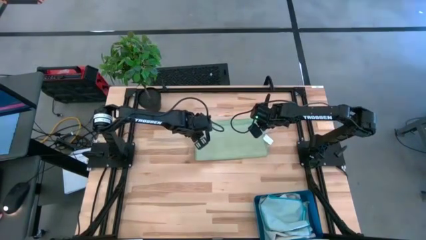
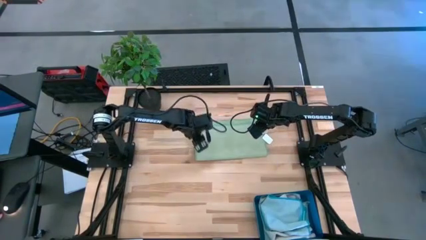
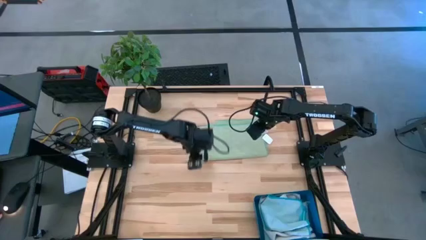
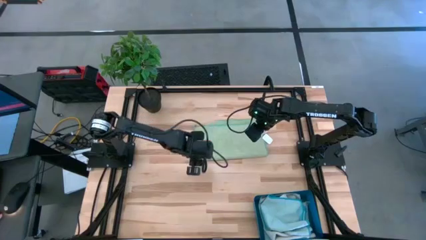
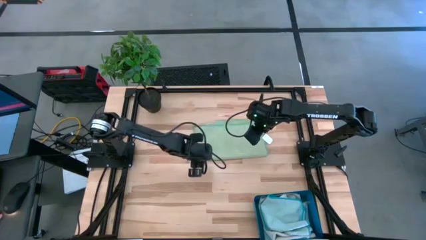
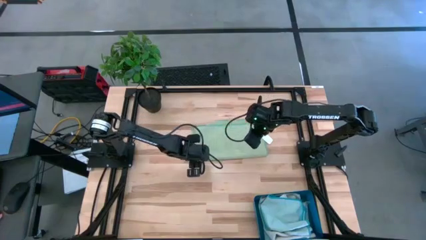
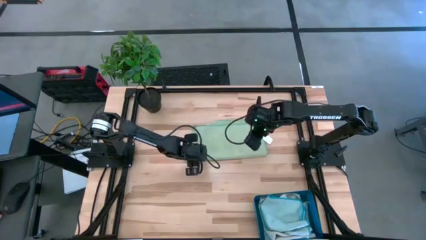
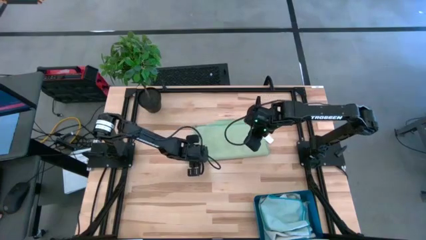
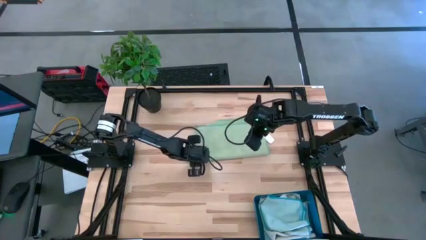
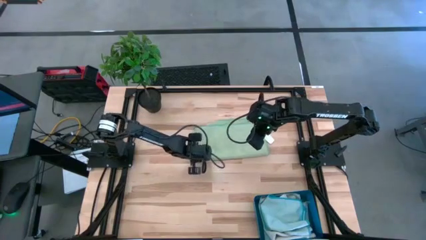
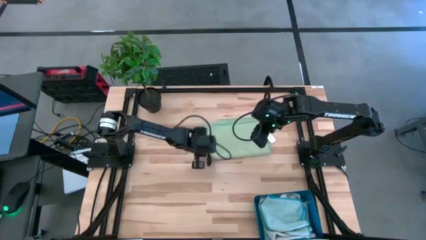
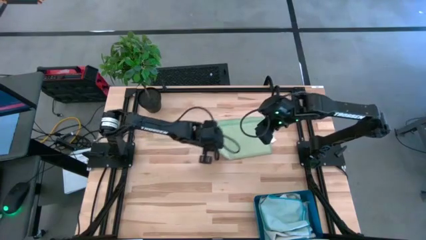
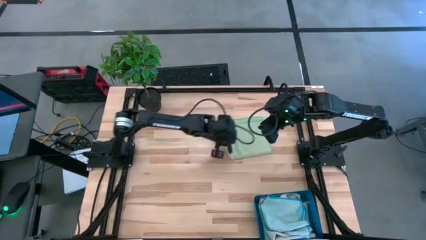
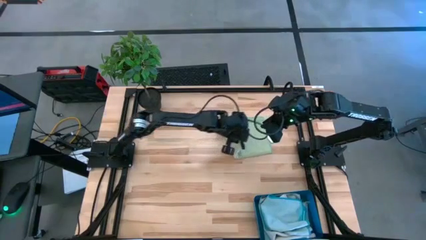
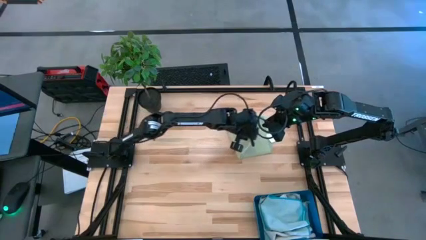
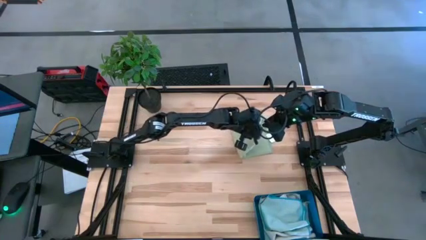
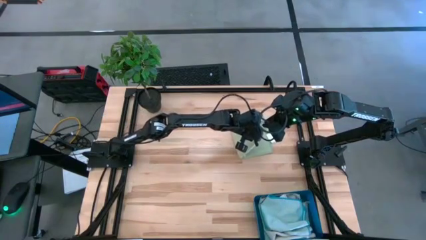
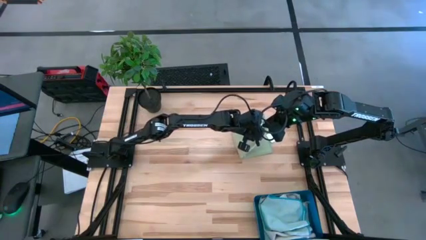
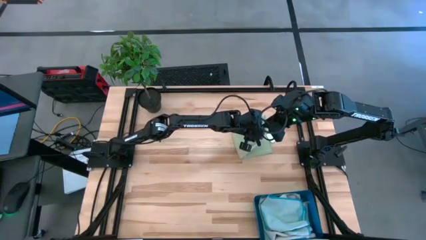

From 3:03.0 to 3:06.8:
Task: Fold microfiber towels
Fold the green microfiber cloth

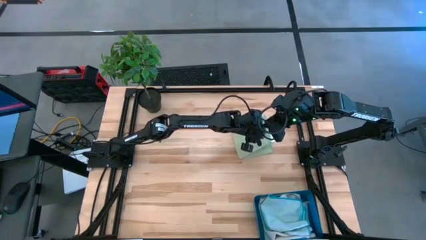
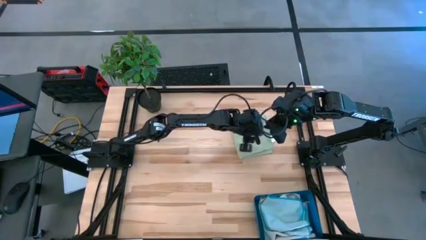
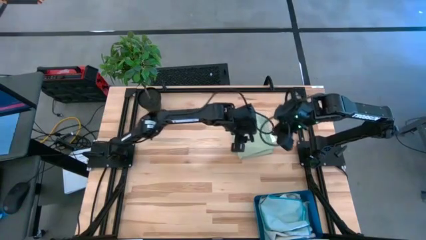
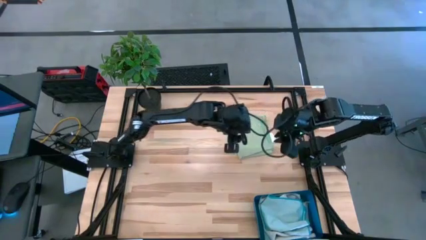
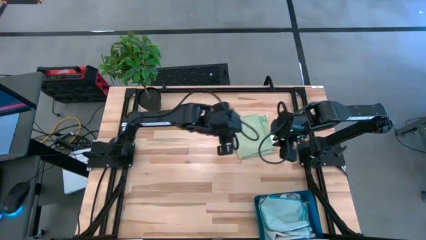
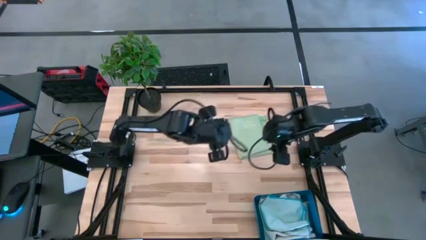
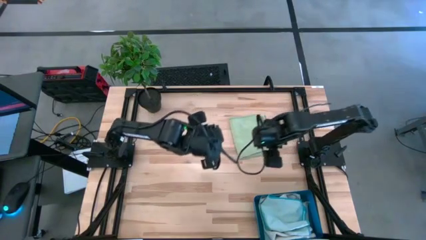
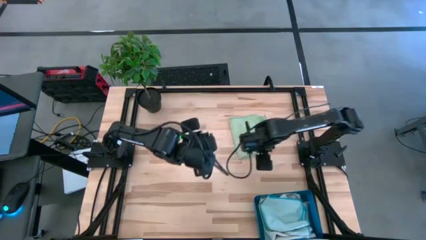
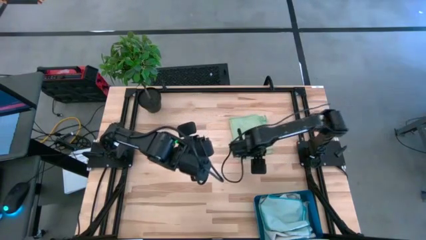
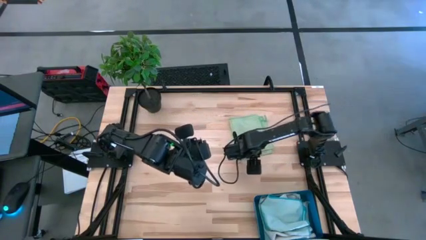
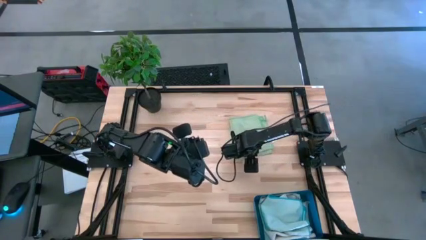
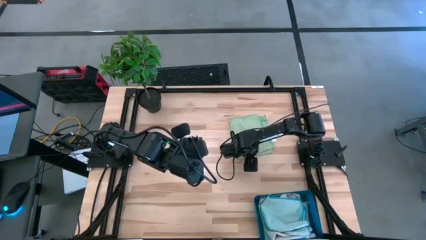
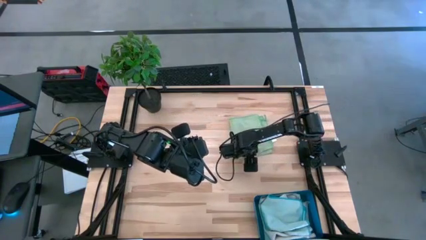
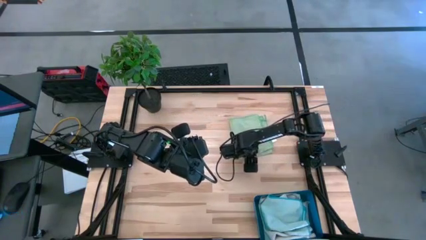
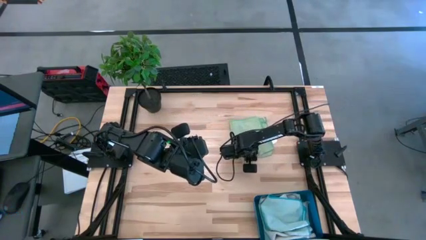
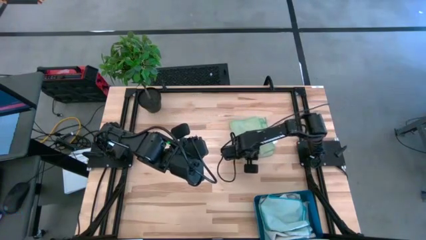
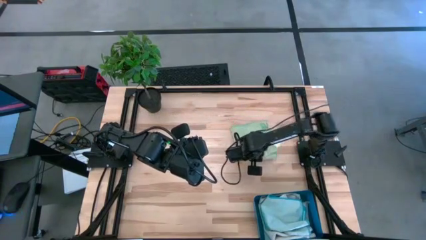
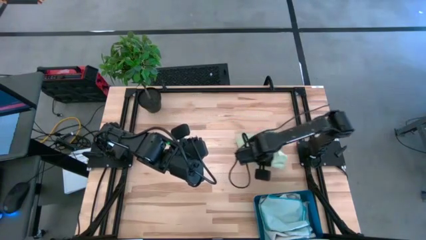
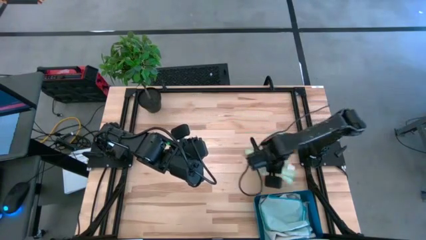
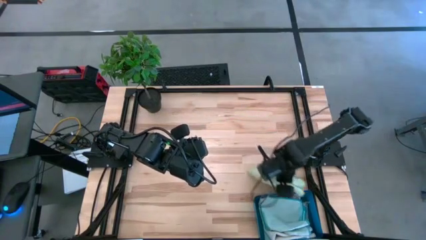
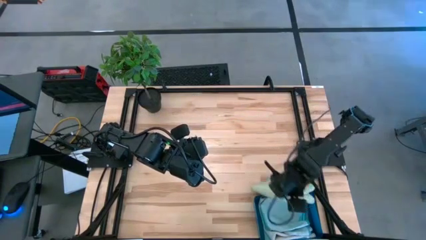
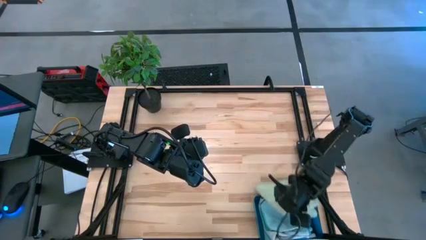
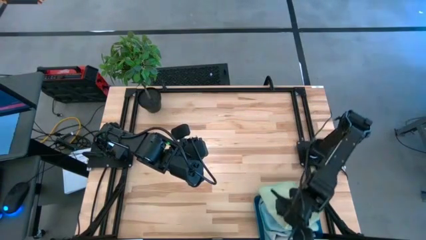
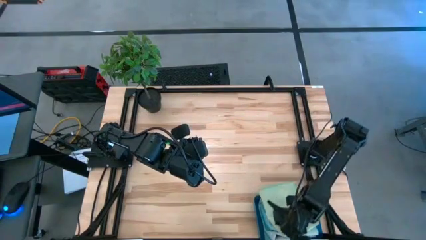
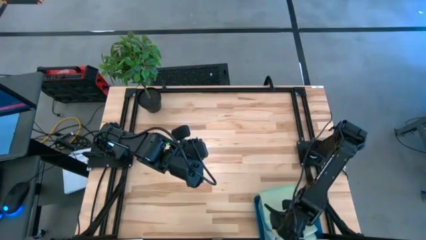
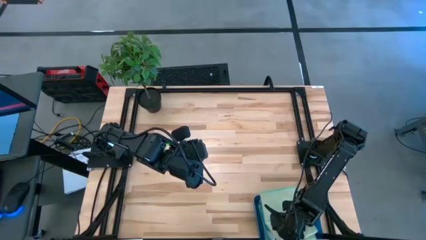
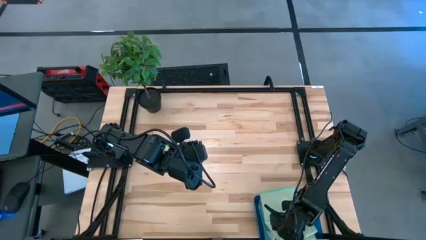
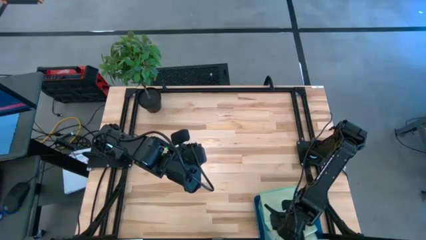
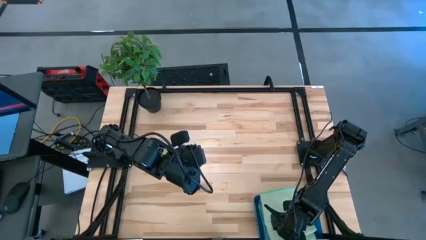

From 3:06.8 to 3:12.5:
Put the green microfiber cloth into the bin

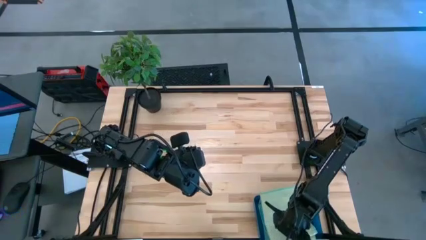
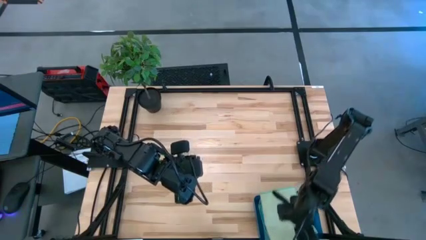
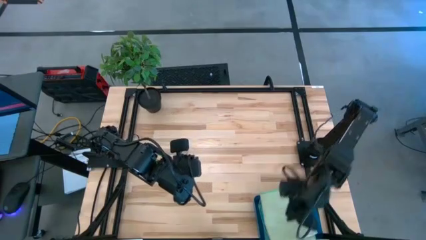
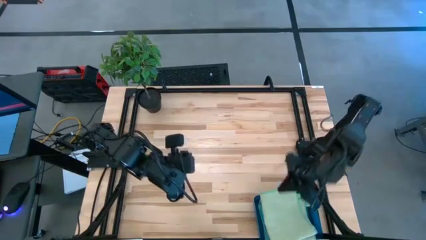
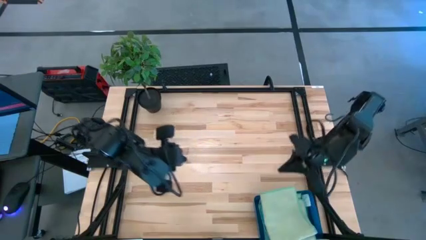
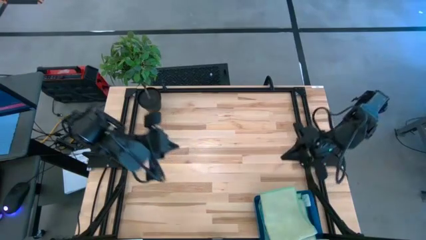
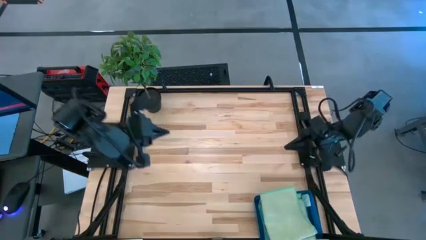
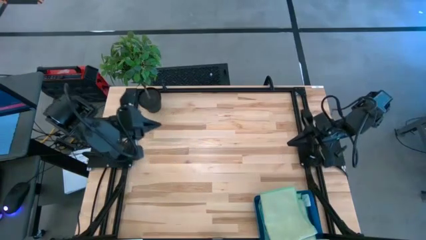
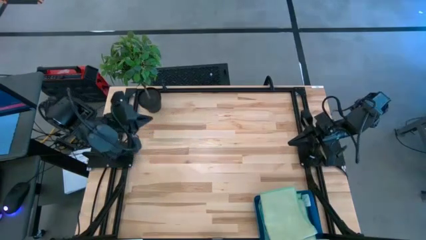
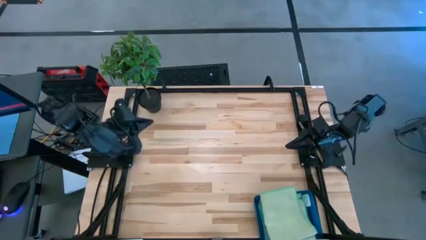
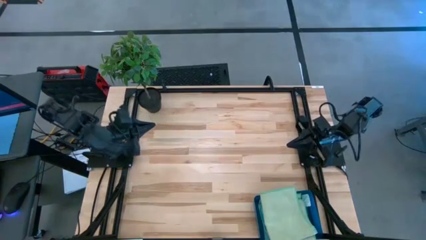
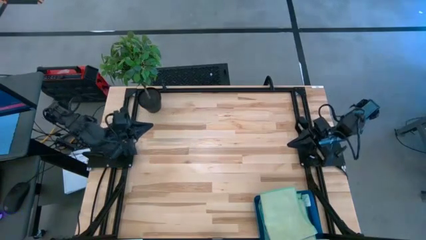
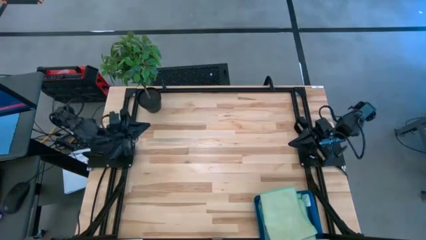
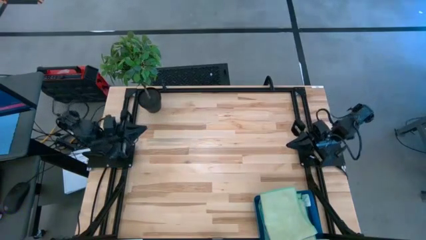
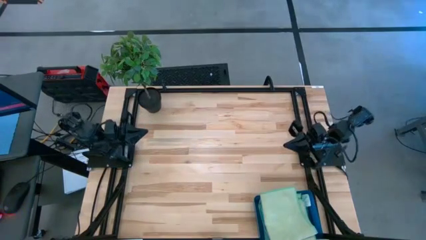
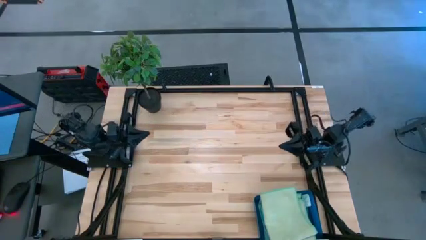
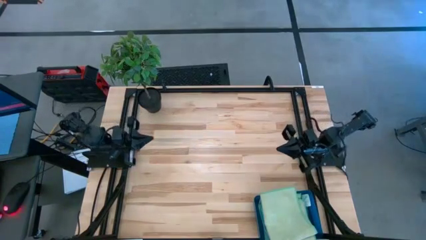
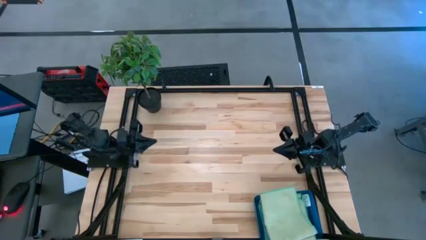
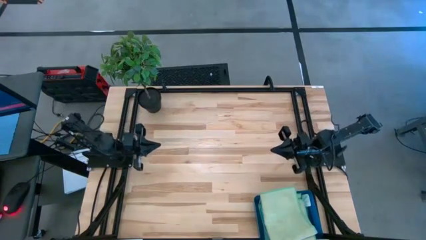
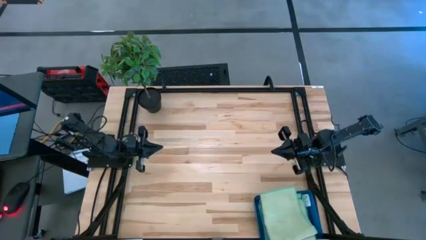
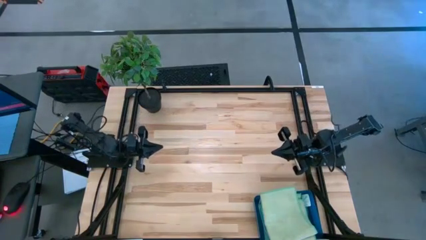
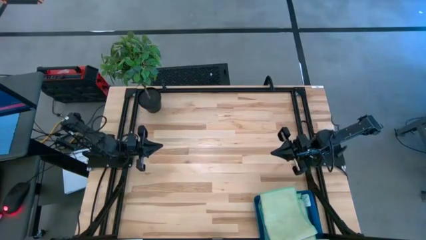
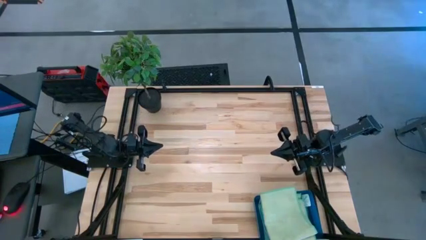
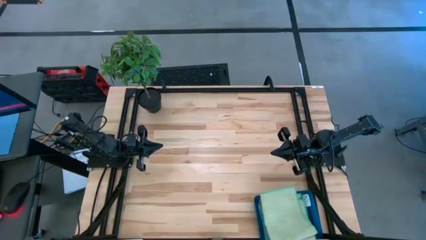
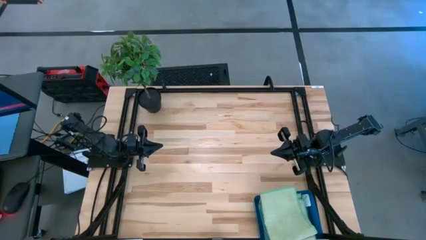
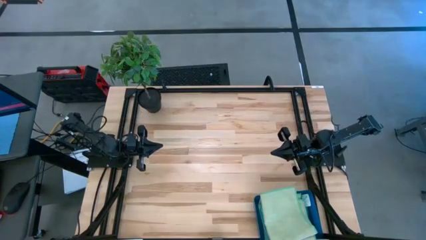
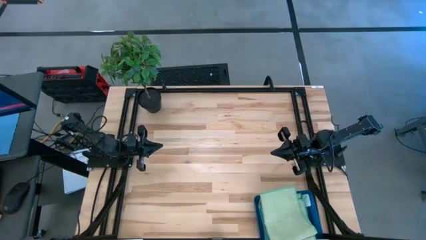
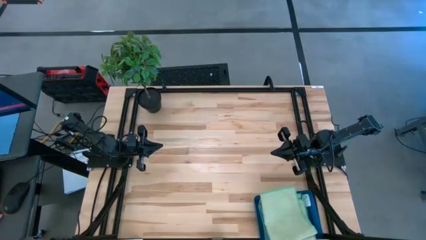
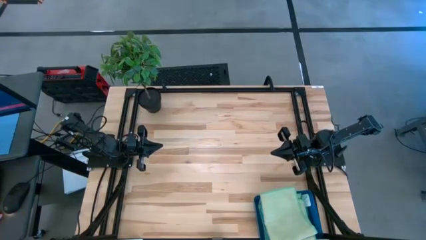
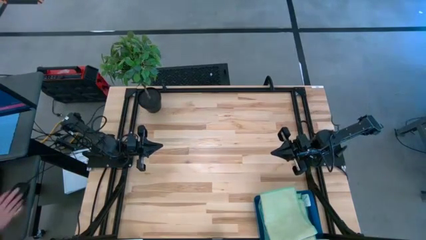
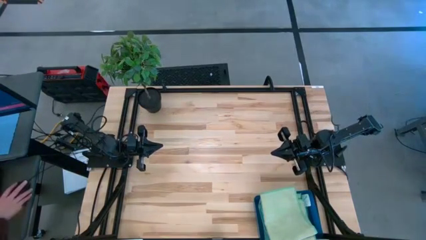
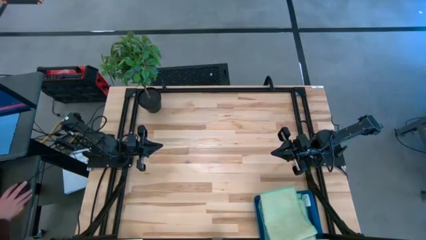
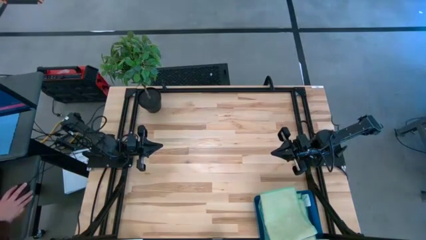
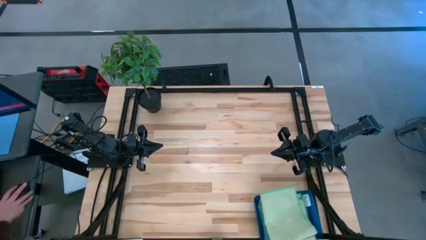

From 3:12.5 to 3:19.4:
Return to Home Position
